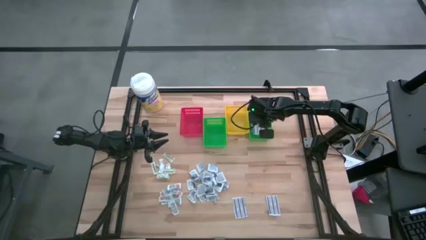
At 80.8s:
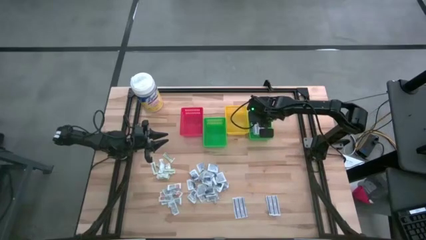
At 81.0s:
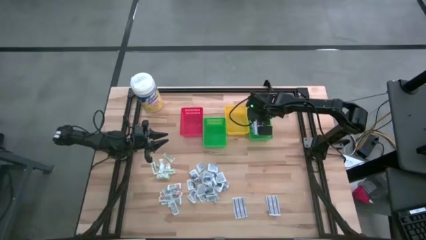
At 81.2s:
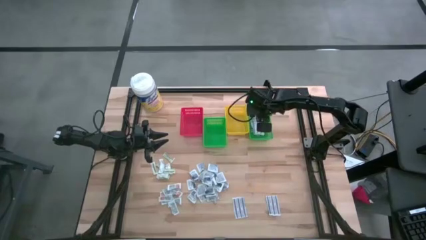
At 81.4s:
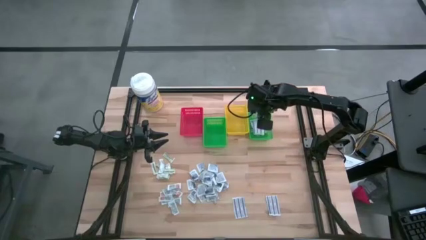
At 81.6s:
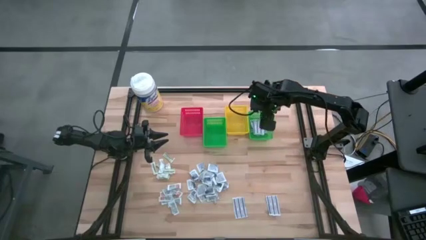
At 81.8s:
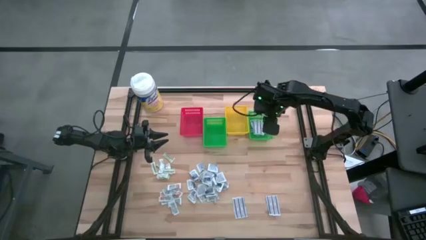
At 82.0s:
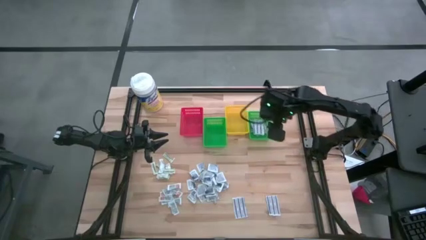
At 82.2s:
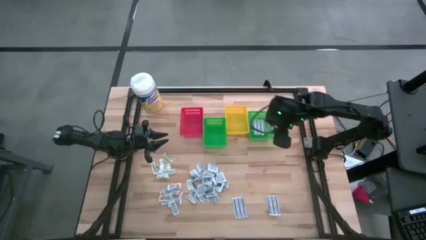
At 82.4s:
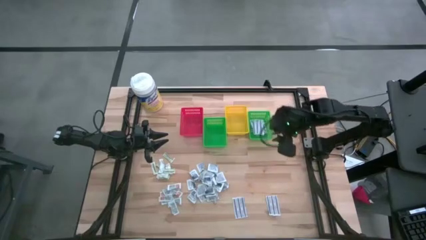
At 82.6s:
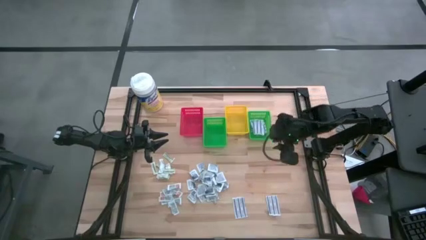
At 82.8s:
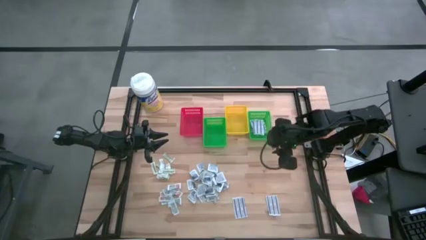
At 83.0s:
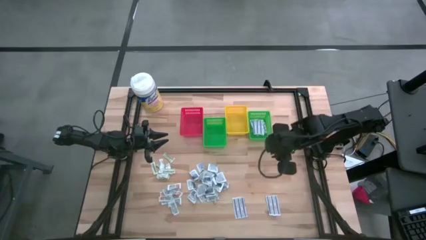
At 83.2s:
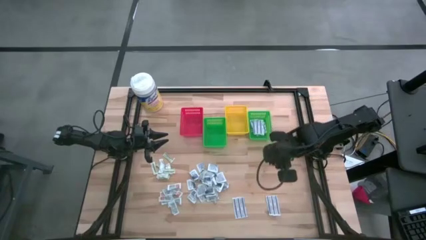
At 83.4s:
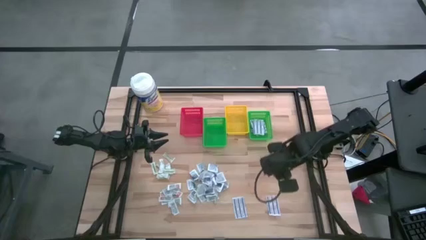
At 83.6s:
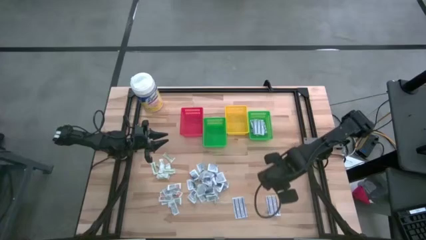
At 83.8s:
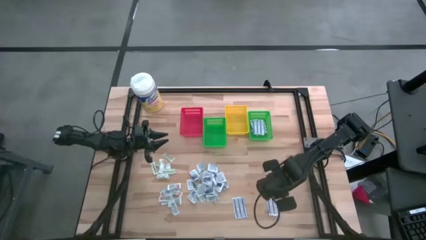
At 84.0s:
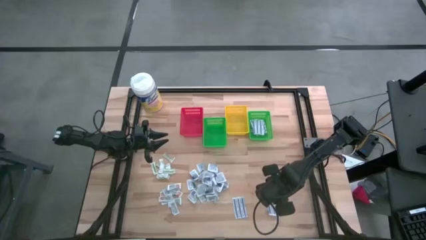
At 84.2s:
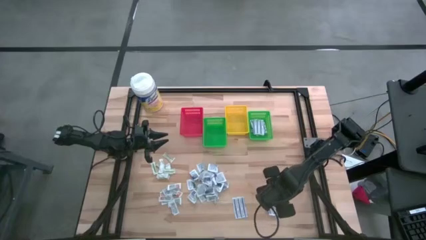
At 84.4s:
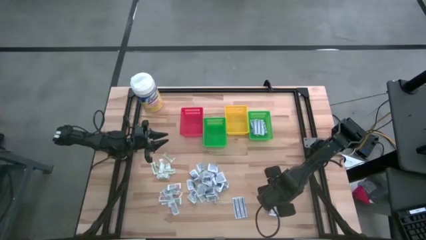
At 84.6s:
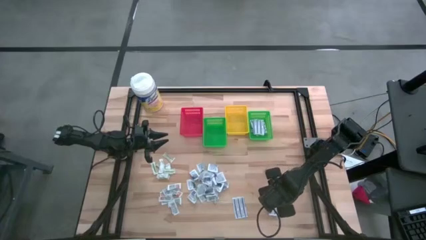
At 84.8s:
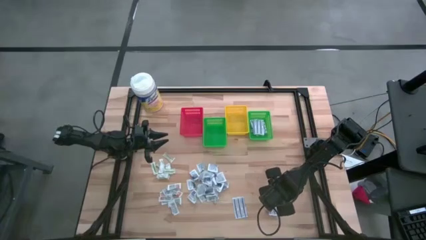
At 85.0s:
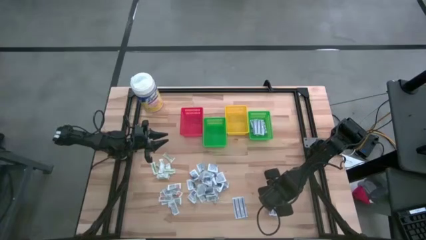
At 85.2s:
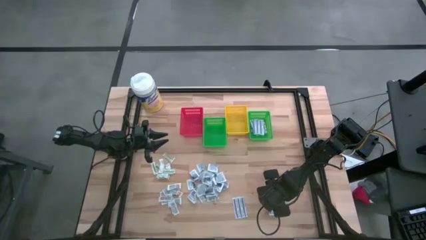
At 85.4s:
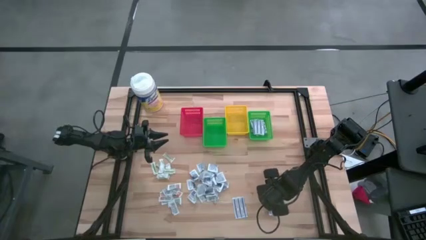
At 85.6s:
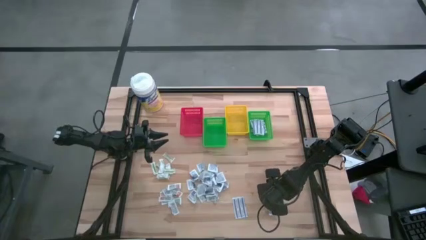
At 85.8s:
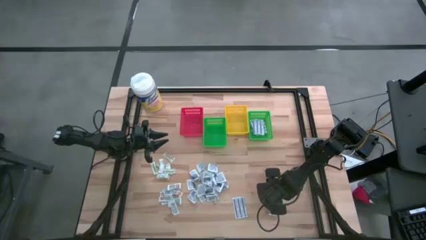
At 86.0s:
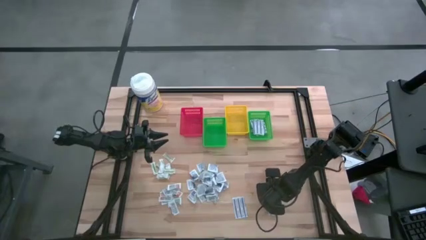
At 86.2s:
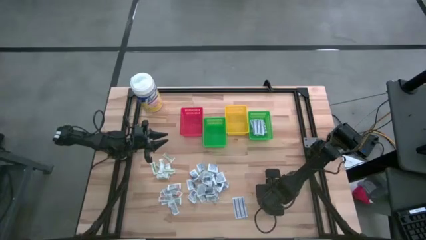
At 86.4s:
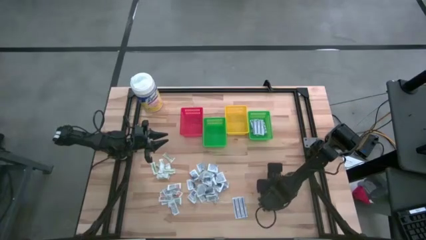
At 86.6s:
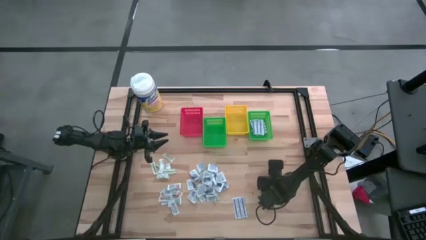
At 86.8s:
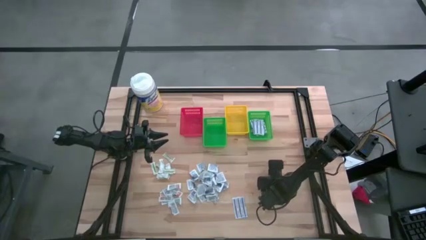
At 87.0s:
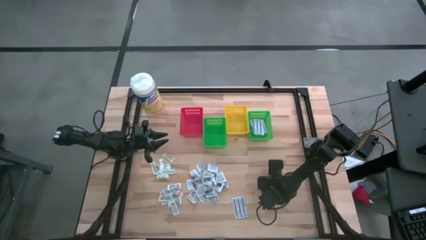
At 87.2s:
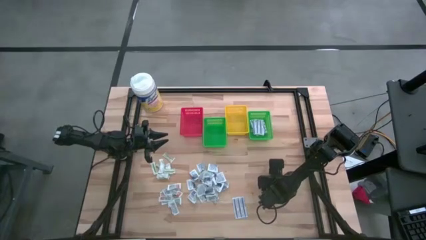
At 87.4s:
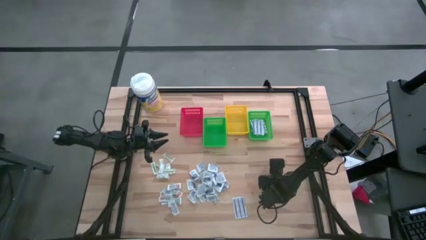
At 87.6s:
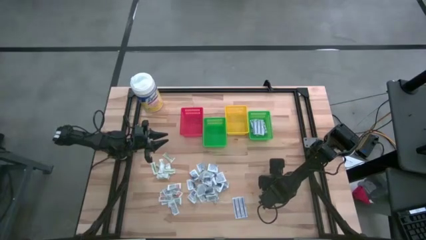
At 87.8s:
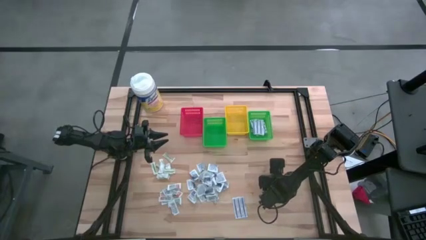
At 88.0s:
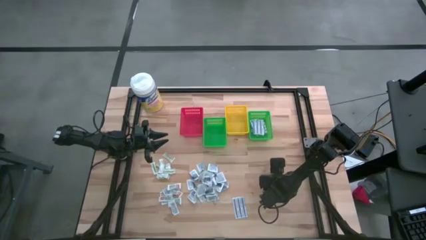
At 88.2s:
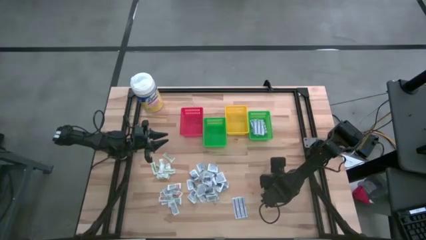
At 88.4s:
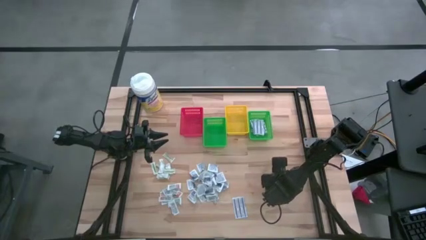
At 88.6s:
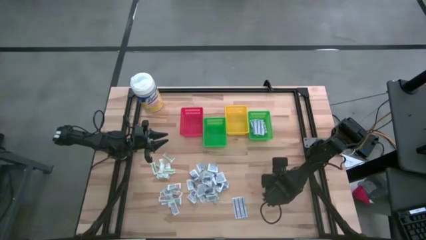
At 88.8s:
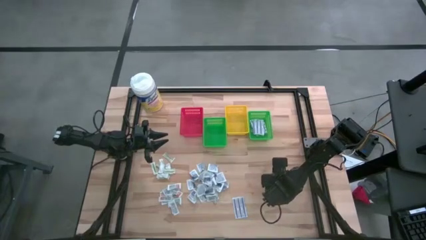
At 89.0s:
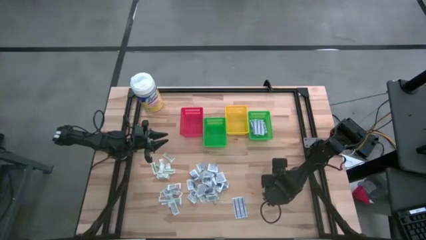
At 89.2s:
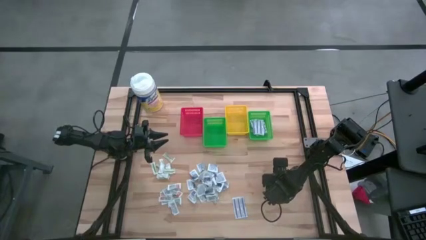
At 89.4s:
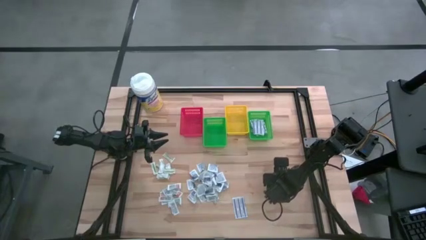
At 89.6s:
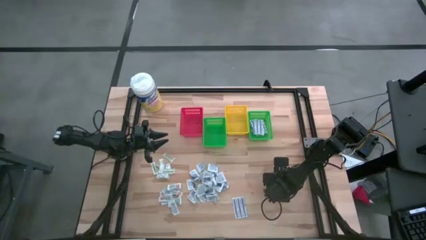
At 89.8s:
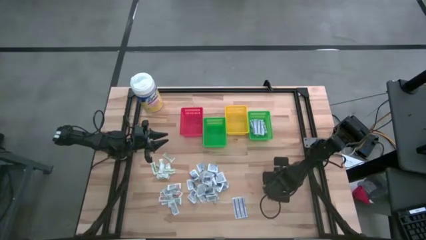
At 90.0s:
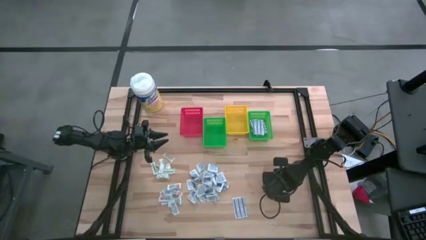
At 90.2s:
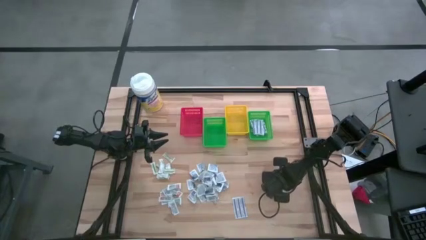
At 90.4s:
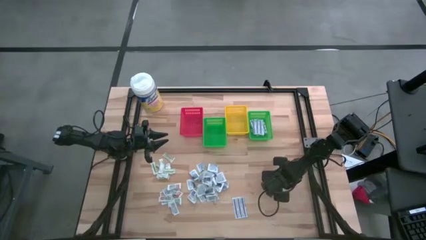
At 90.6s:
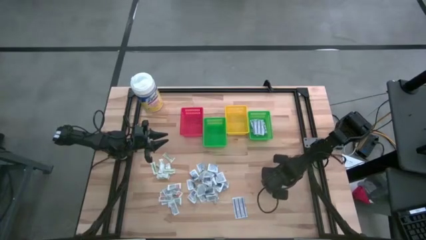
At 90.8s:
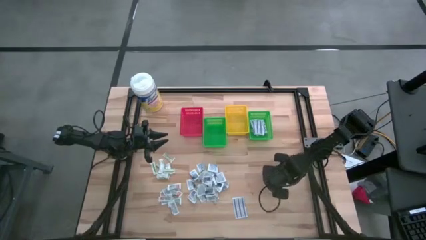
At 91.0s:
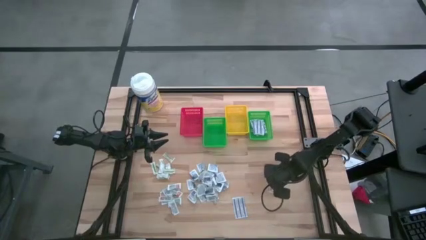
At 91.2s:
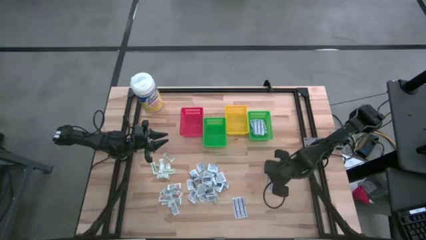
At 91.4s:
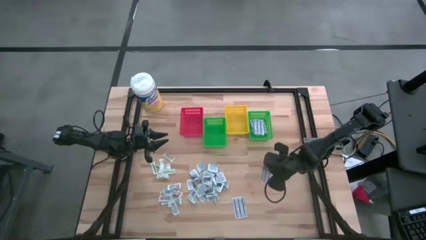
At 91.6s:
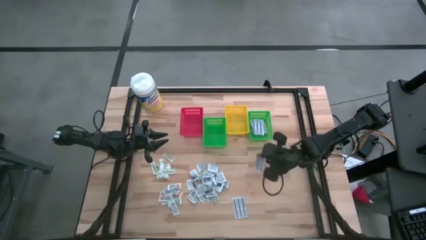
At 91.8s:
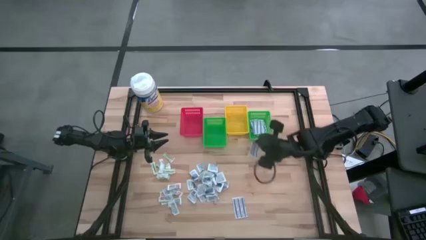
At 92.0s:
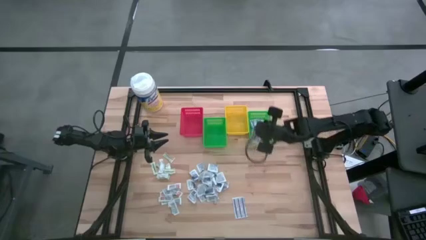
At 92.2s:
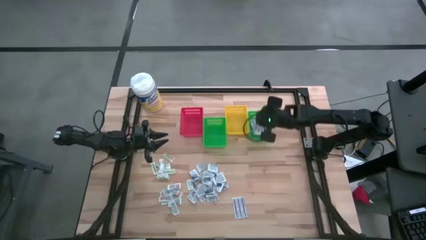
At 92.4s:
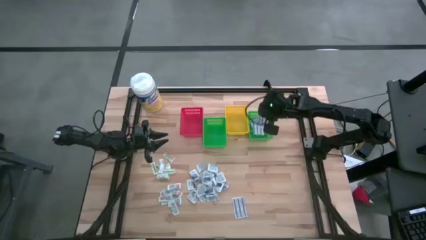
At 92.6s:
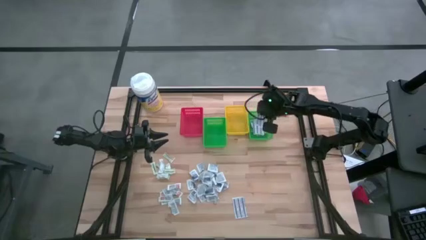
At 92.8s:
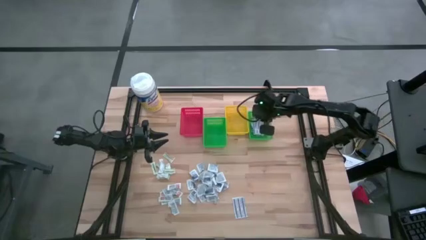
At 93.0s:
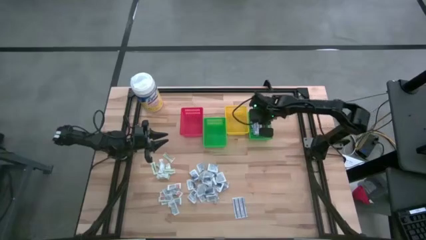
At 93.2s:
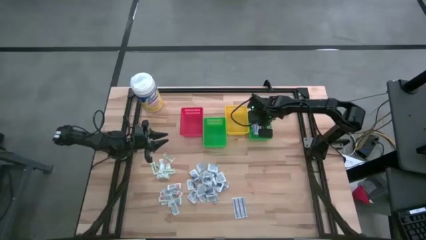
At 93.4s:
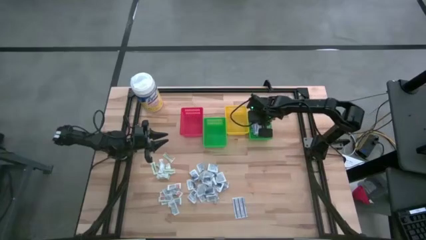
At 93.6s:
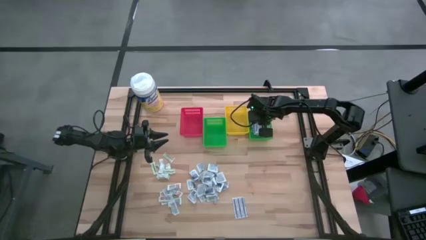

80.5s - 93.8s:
Task: Pick & Place First Aid Supplies
Put the blue bandage into the right green basket

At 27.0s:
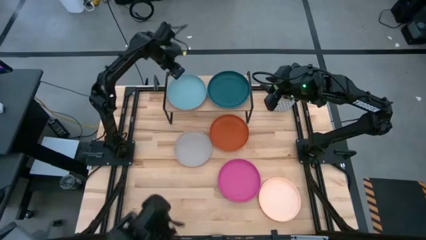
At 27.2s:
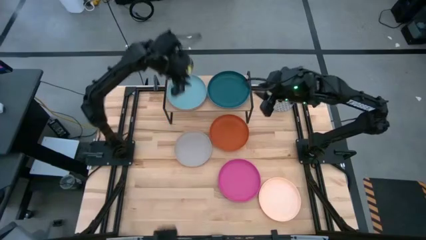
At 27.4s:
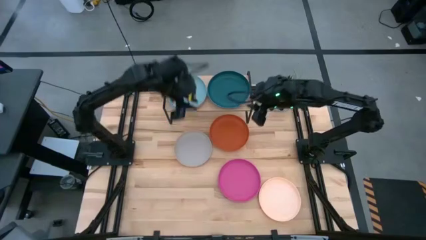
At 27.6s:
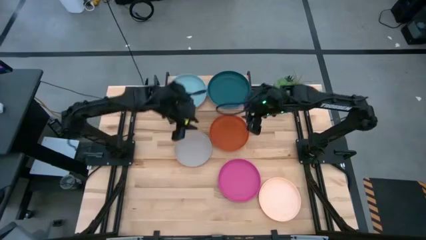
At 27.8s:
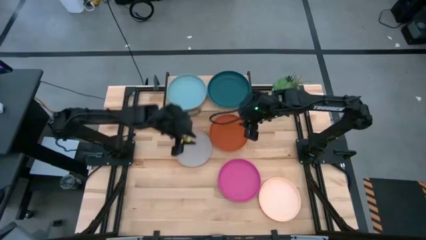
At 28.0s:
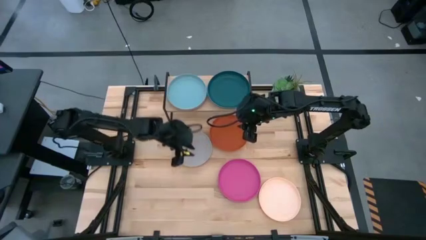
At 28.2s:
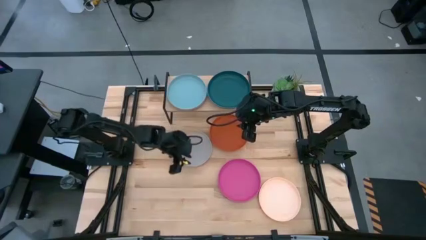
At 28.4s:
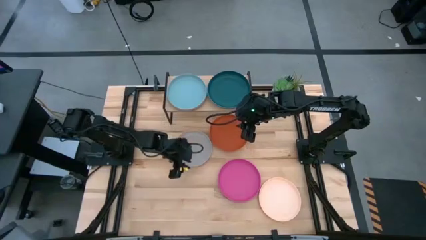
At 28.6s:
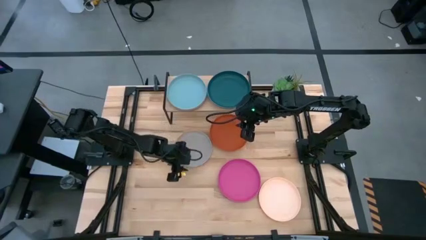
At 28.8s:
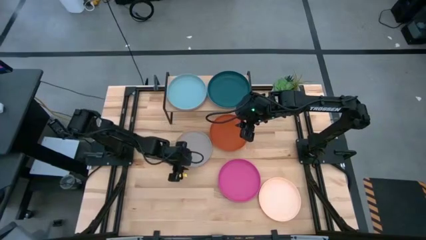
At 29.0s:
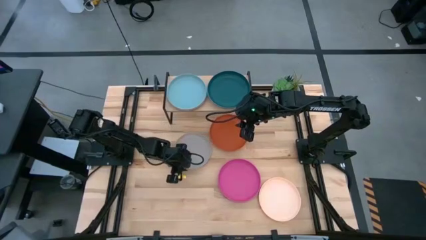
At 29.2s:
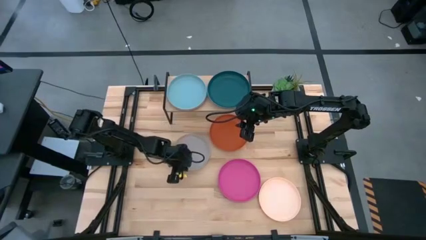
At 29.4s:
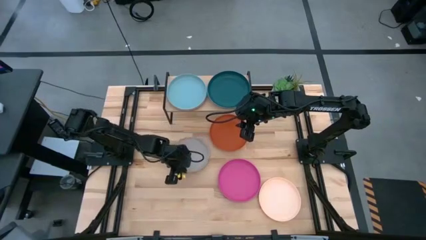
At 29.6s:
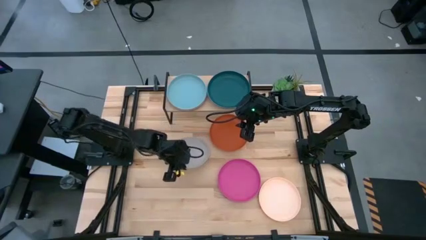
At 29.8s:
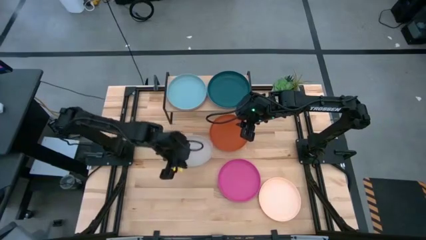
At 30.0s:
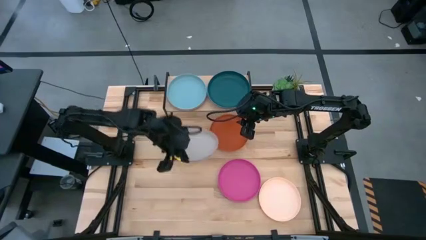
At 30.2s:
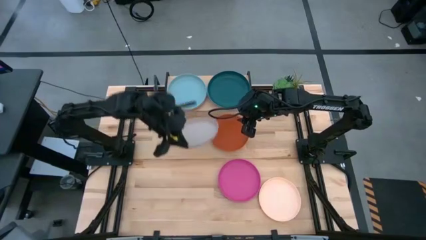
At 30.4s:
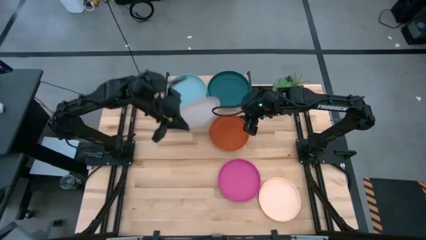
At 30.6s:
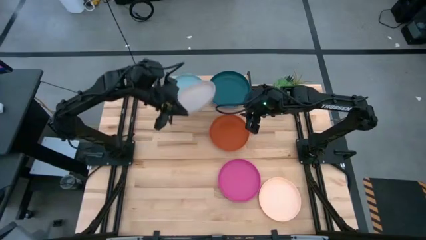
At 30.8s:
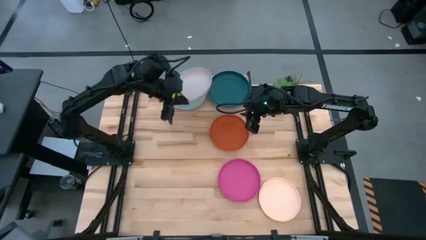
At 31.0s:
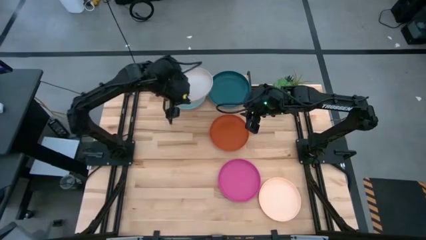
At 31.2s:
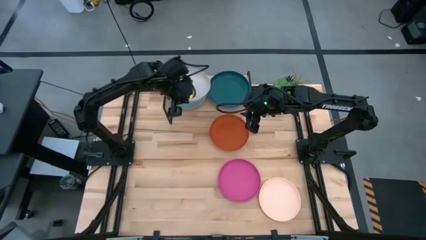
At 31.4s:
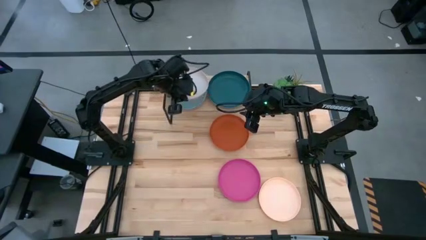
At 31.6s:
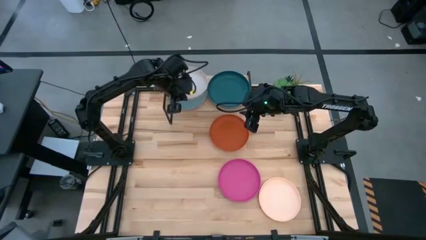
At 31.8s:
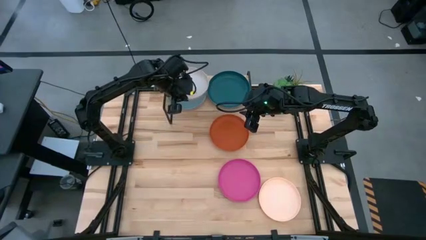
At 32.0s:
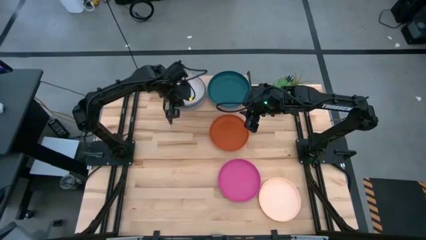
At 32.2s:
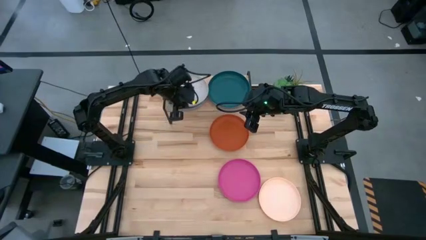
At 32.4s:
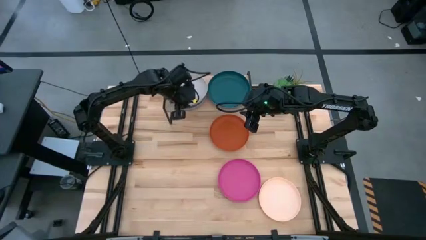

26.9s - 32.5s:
Task: Place and stack plates onto a shelf
Stack the gray plate on top of the light green plate on the shelf
